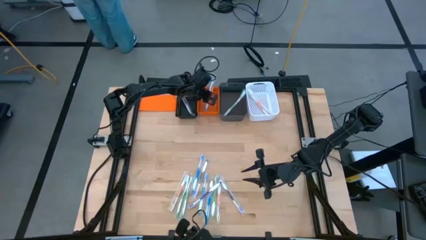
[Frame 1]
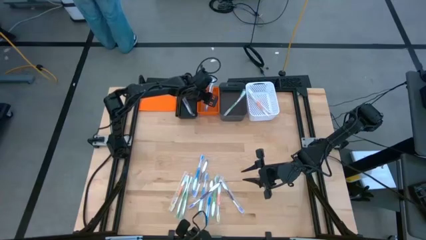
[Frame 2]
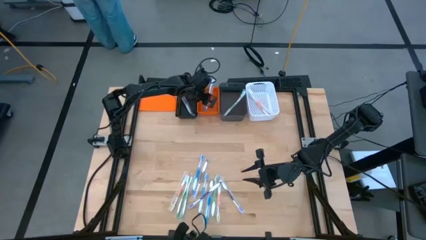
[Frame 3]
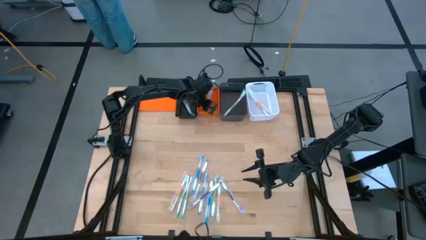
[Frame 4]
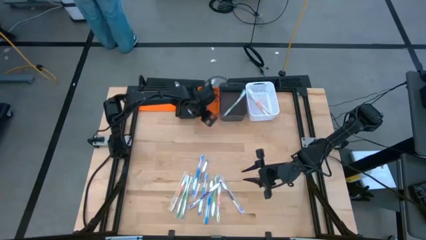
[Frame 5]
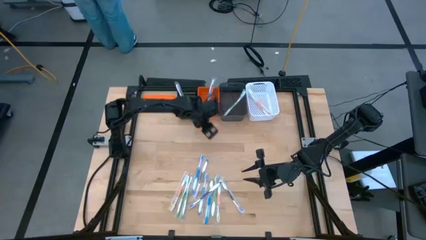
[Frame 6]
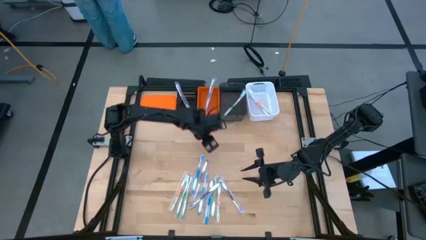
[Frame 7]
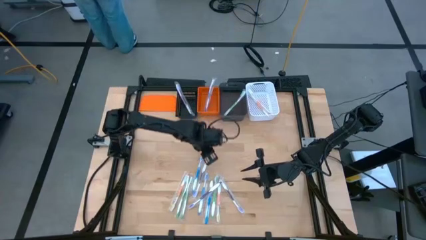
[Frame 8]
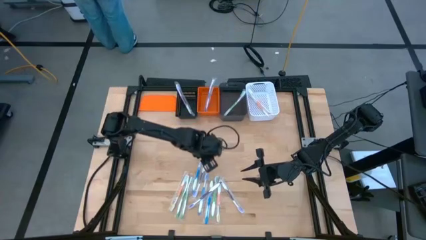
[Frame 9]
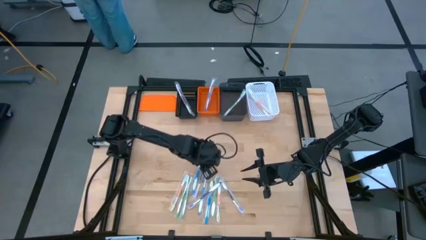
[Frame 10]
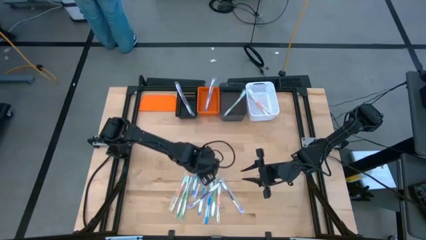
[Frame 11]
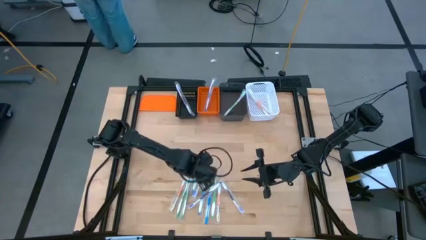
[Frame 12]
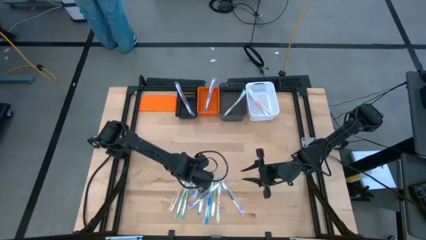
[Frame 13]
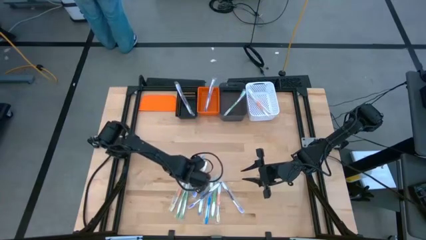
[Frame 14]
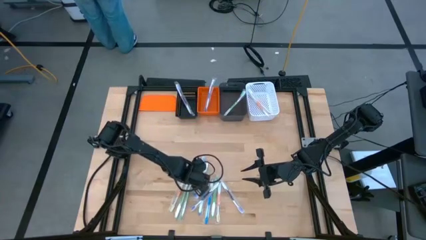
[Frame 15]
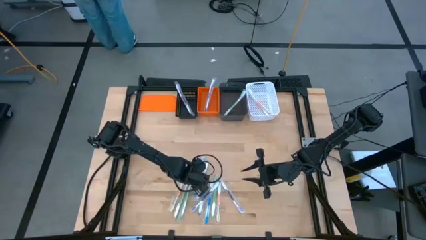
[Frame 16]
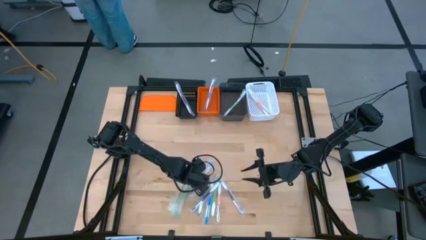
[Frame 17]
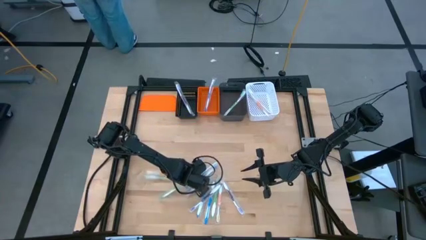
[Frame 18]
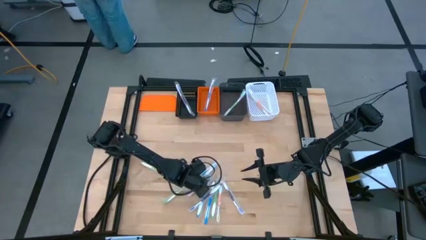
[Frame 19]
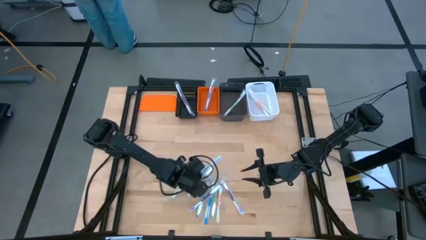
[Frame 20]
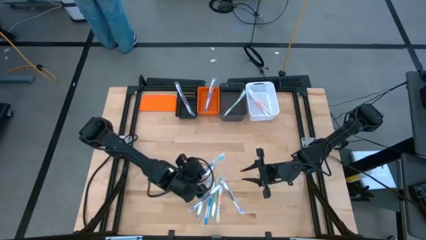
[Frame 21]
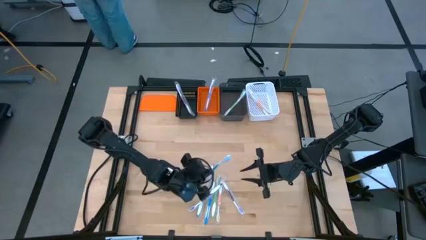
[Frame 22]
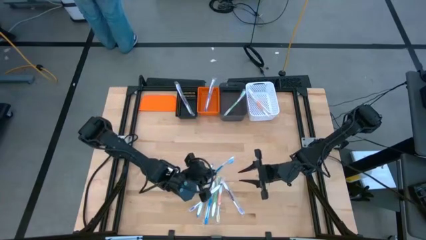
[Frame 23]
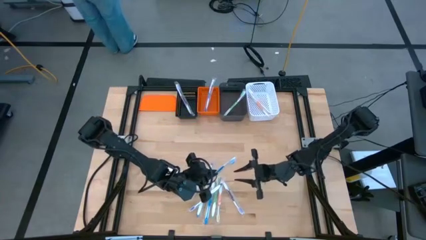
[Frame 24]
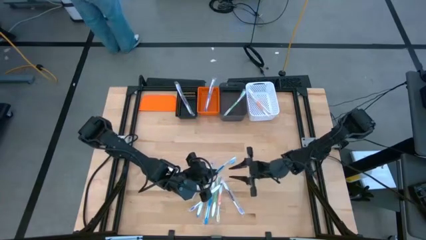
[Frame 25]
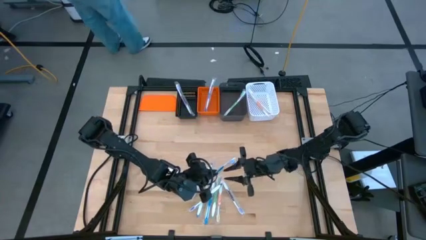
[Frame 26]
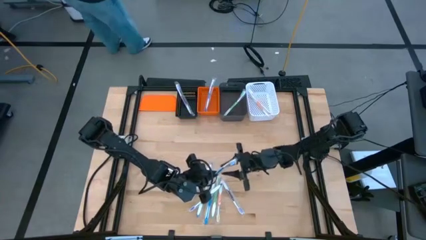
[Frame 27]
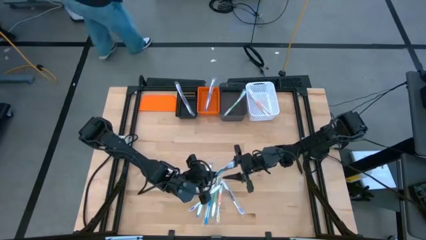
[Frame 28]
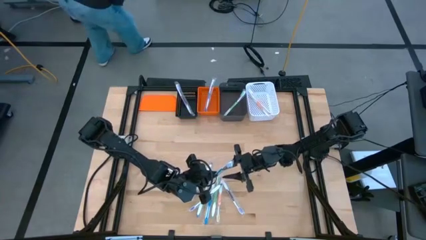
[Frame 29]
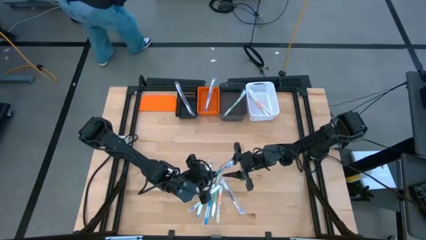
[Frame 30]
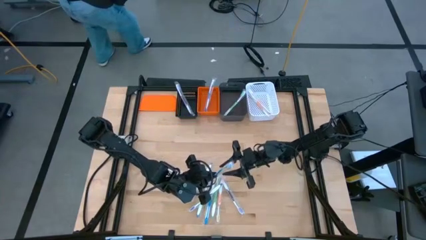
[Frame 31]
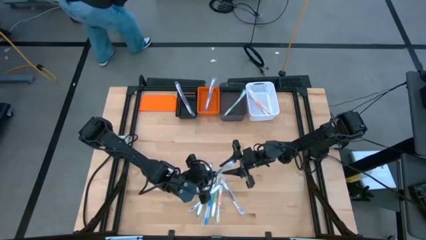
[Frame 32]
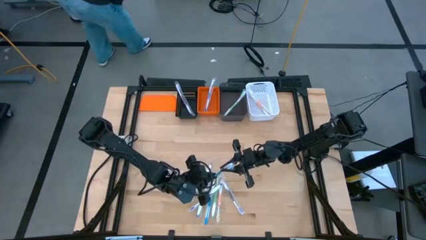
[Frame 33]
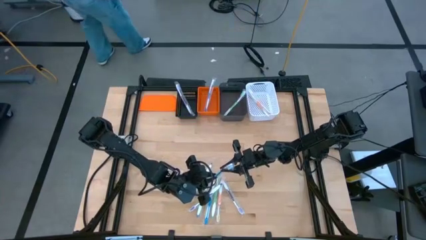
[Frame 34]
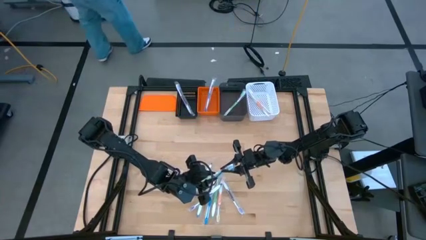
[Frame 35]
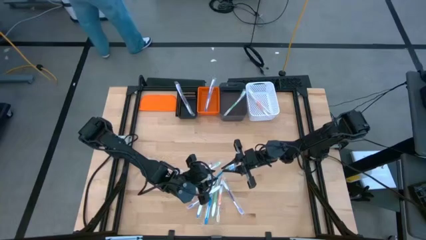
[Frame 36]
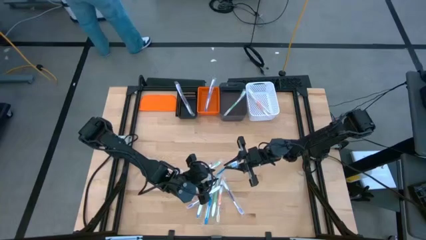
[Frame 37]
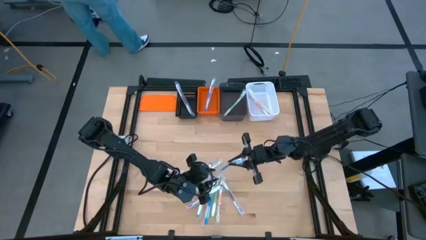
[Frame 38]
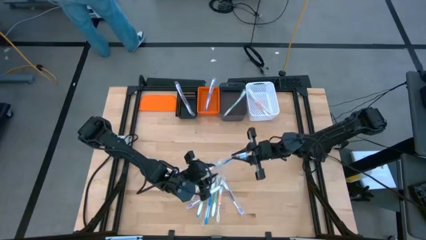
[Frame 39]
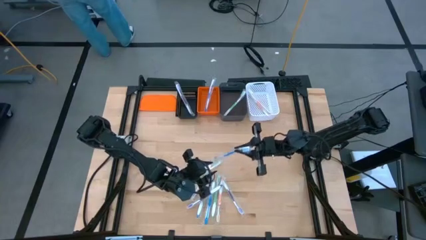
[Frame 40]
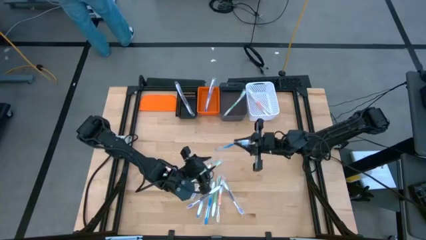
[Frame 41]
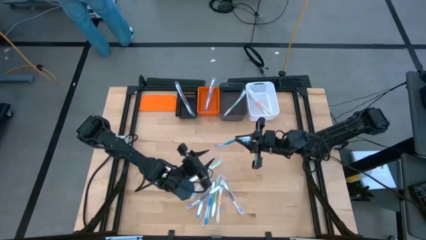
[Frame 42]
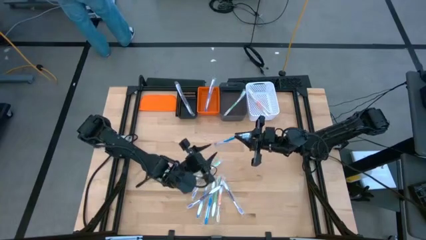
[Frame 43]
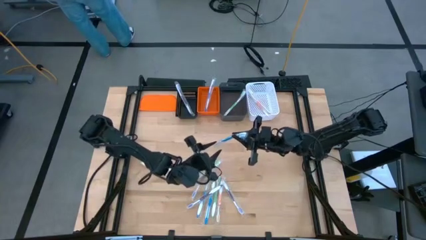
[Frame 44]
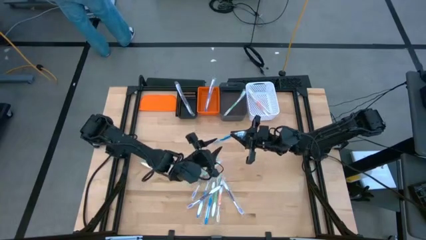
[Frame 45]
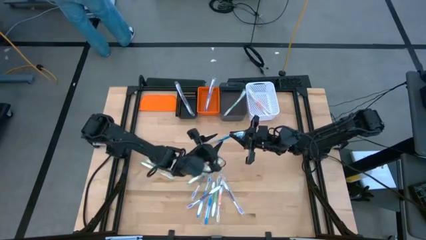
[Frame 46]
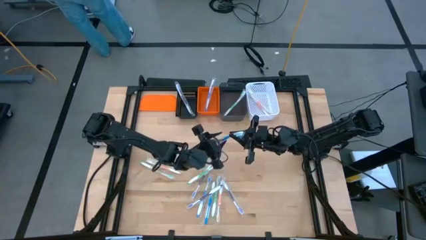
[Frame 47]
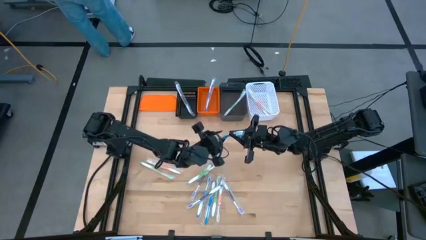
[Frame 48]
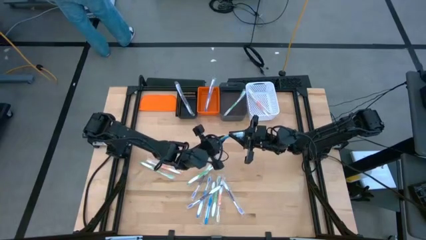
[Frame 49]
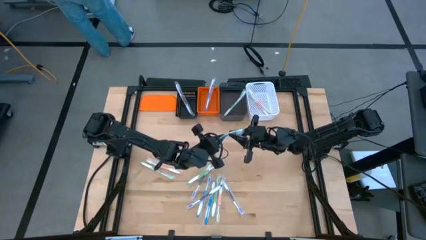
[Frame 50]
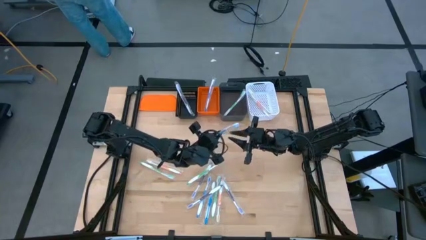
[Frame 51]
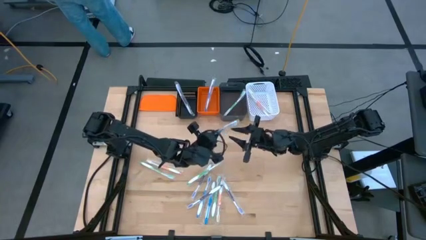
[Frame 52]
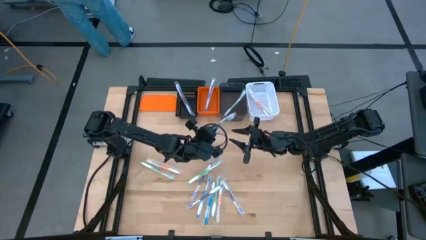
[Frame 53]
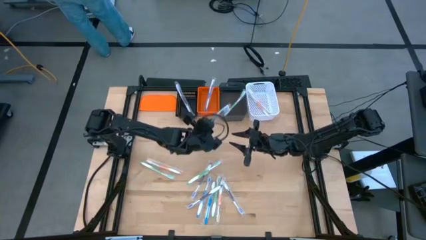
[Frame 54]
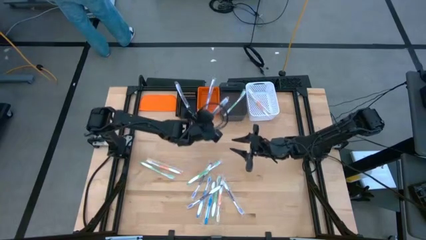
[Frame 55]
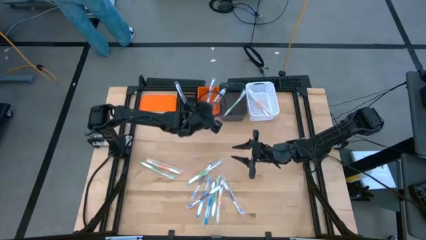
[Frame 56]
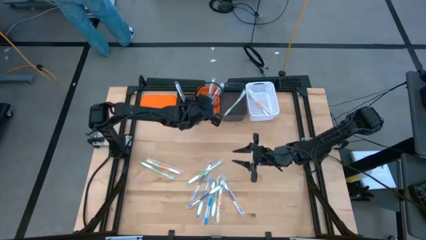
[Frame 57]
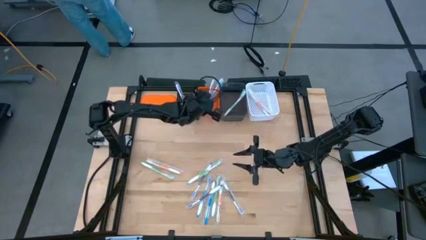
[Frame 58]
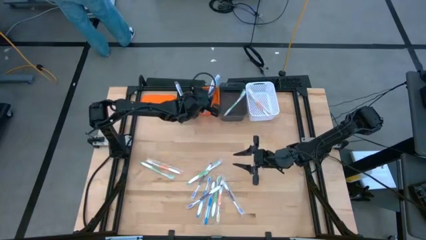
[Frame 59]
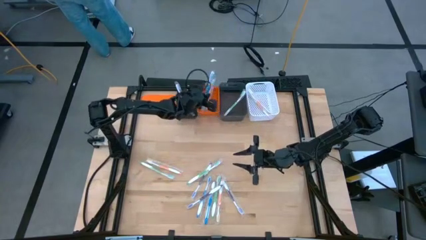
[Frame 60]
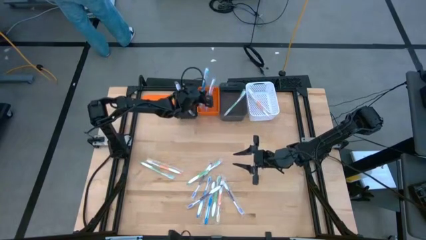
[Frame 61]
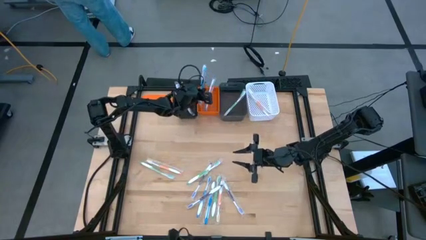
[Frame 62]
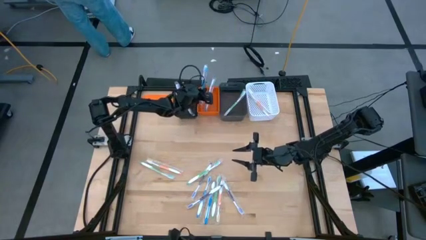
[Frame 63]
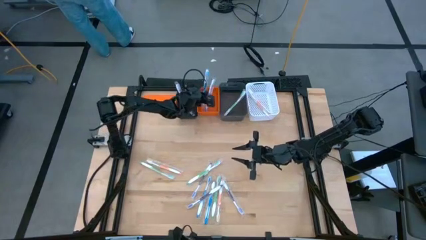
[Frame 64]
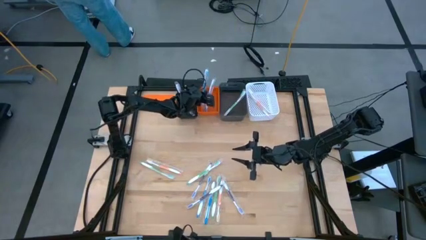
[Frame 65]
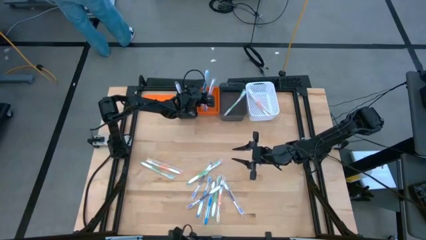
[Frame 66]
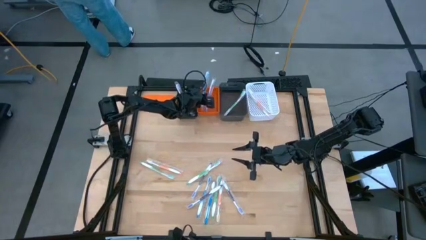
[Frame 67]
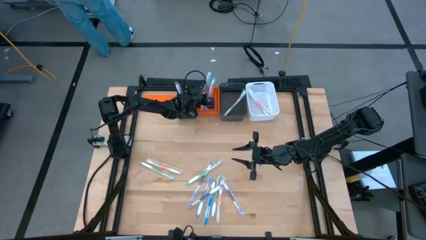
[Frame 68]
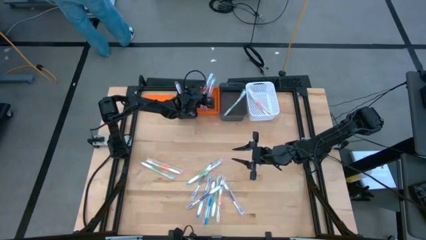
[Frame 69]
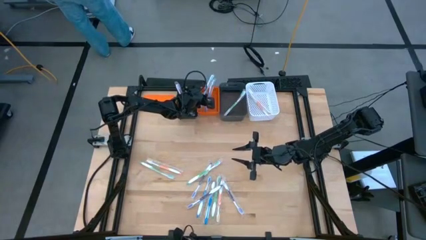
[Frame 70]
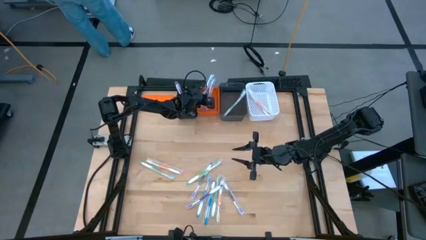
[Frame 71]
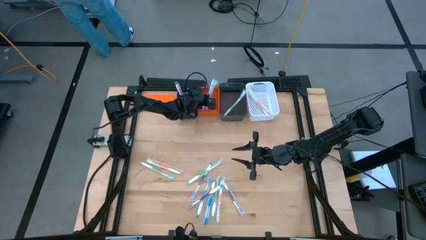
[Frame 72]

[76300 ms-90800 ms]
Task: Pick & Place Toothbrushes
Put the blue toothbrush into the orange basket

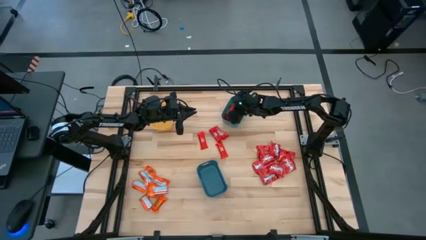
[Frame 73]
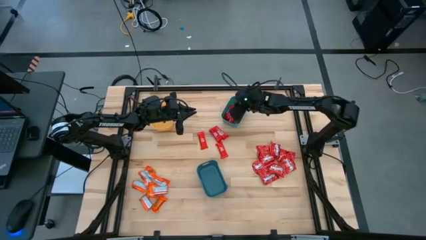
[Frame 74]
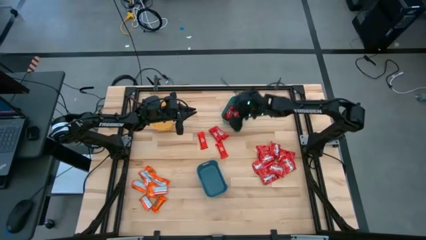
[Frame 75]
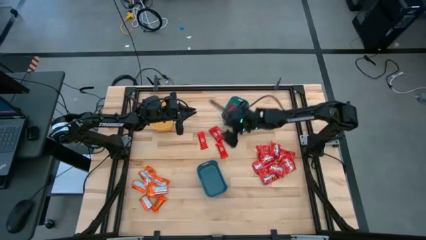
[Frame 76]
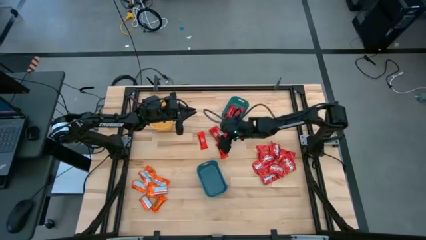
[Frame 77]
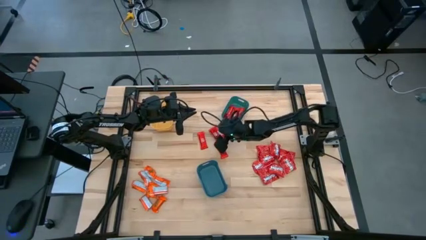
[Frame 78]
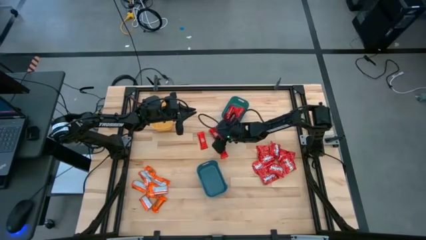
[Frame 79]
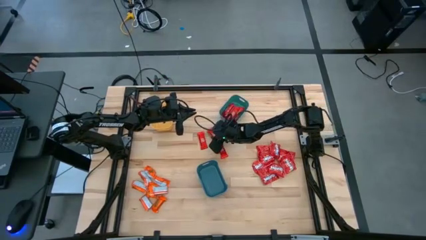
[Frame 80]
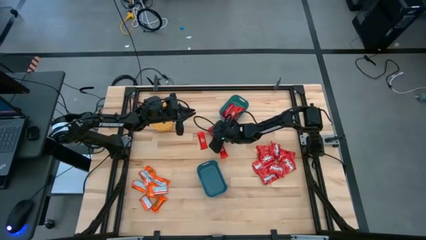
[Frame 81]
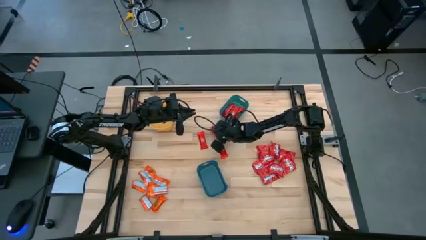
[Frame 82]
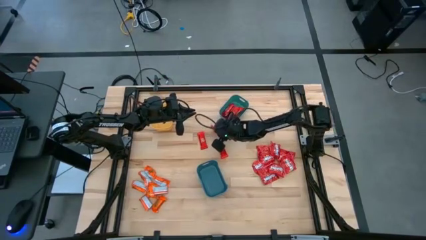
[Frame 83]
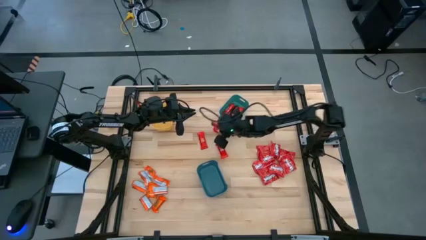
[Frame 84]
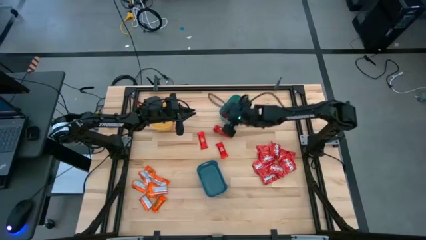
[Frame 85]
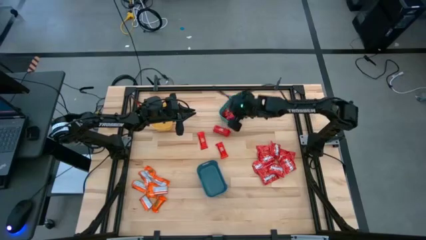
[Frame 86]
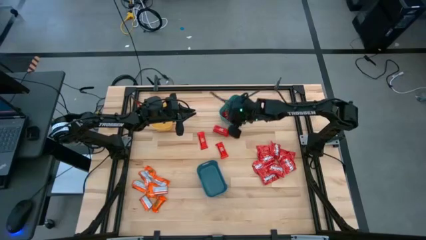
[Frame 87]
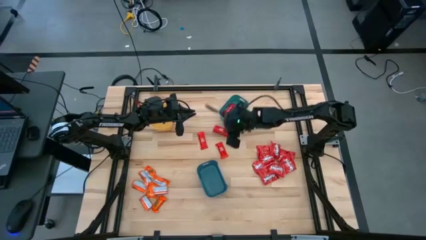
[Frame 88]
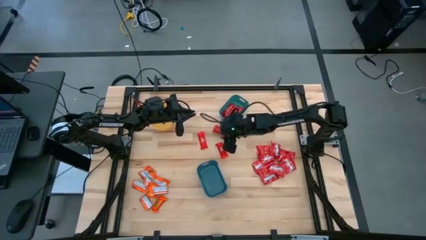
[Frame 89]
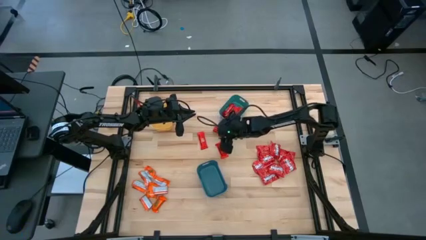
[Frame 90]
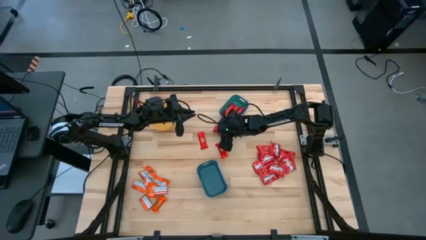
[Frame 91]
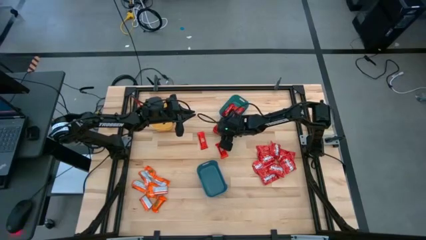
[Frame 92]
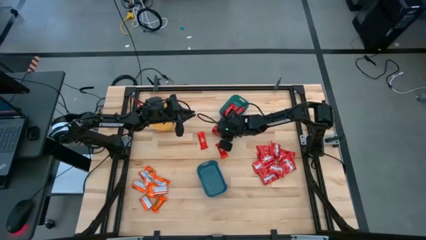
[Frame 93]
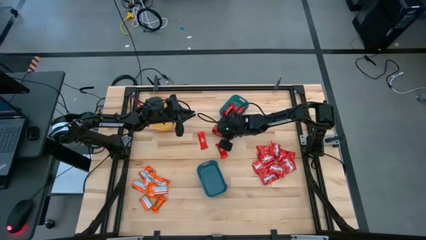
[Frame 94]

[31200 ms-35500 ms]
Task: Sort candy
Put the red chocolate bar into the green bin
